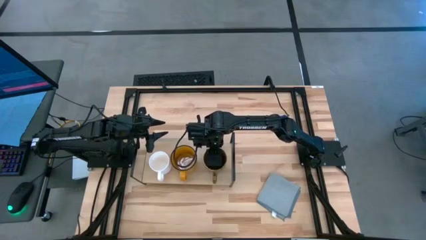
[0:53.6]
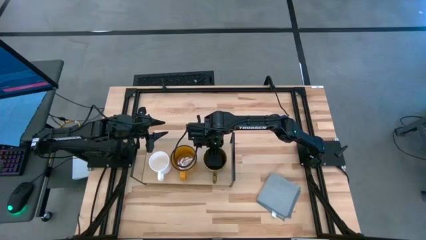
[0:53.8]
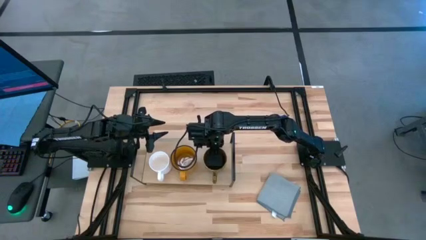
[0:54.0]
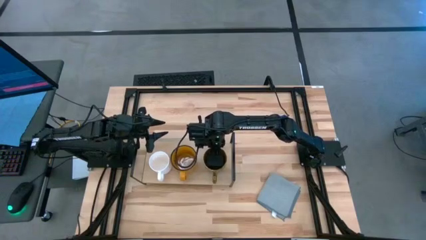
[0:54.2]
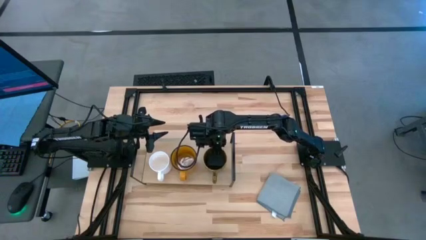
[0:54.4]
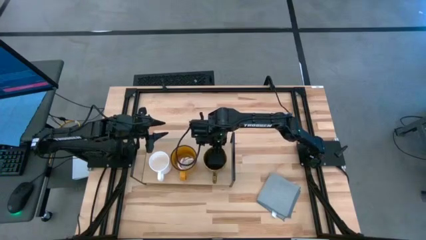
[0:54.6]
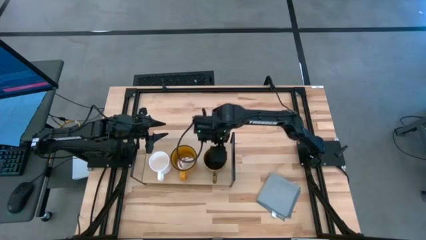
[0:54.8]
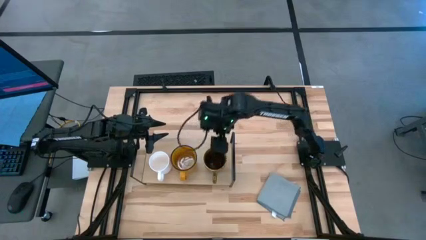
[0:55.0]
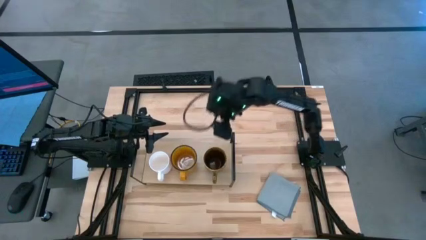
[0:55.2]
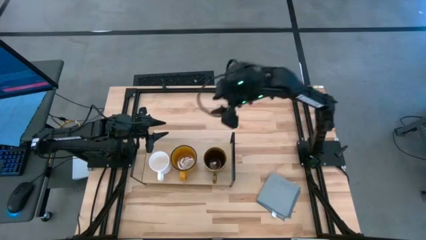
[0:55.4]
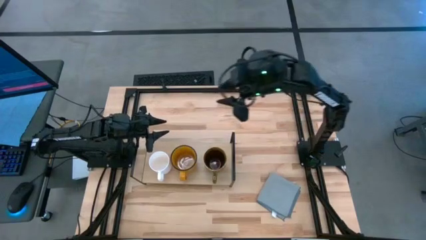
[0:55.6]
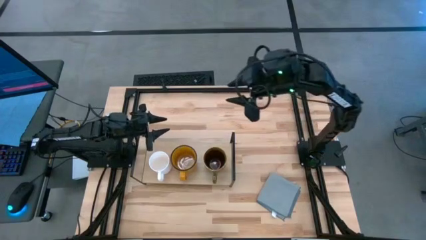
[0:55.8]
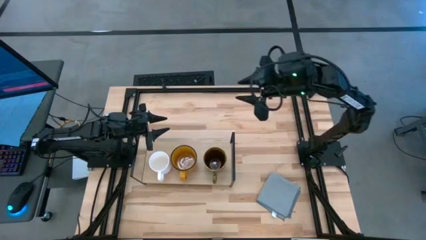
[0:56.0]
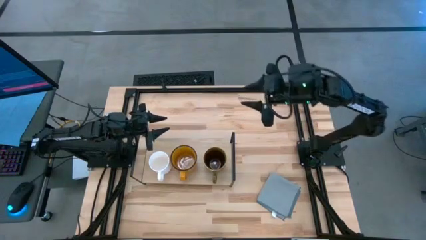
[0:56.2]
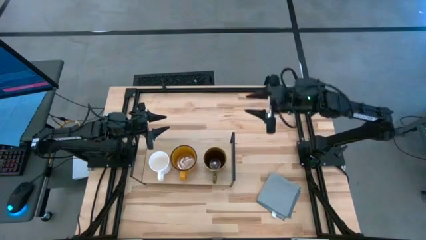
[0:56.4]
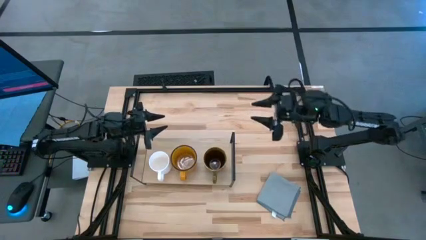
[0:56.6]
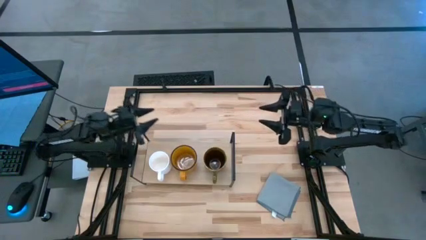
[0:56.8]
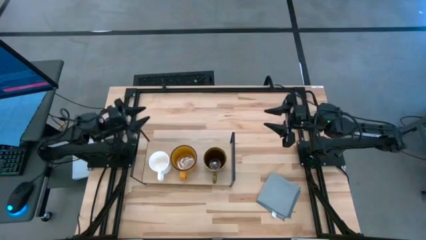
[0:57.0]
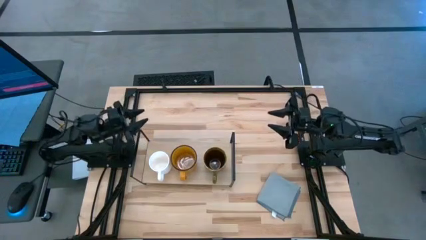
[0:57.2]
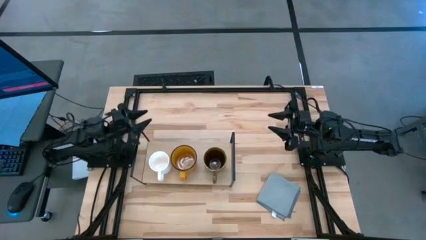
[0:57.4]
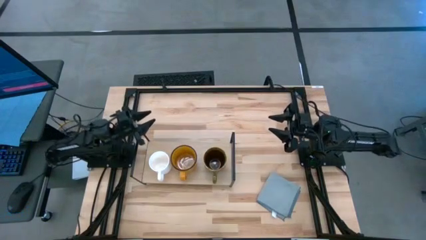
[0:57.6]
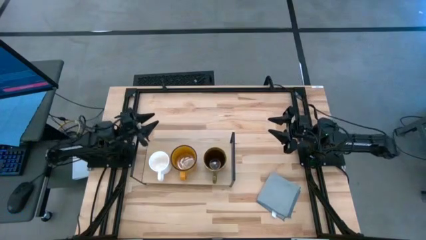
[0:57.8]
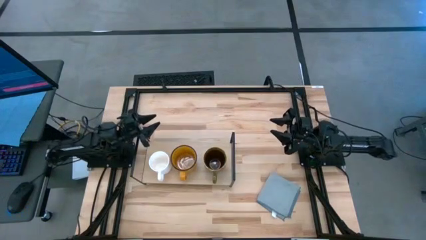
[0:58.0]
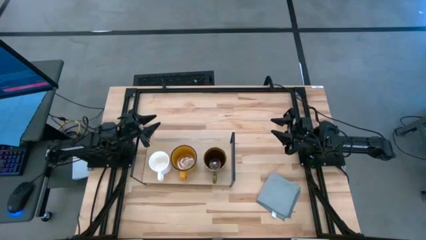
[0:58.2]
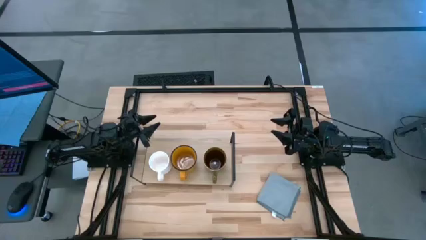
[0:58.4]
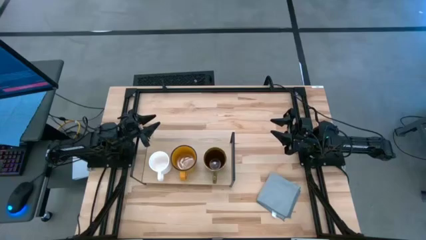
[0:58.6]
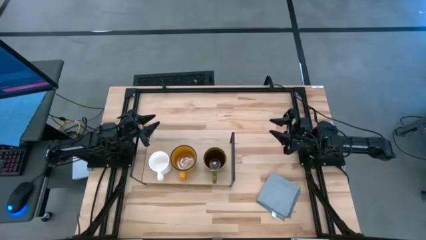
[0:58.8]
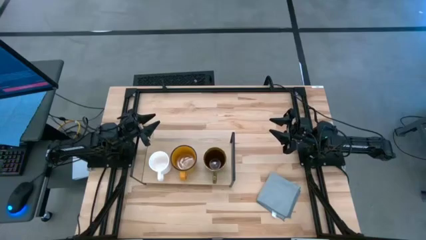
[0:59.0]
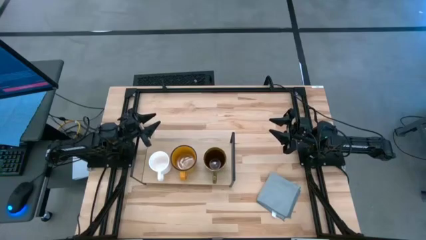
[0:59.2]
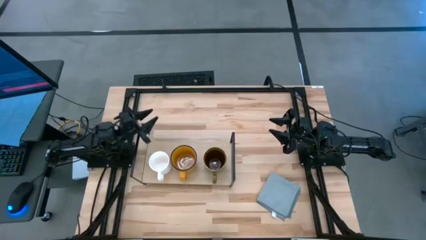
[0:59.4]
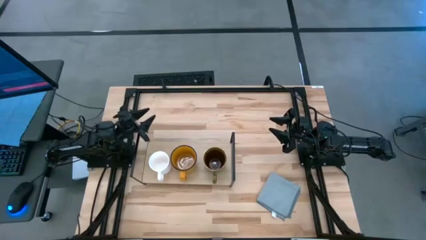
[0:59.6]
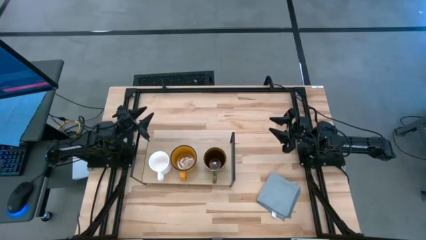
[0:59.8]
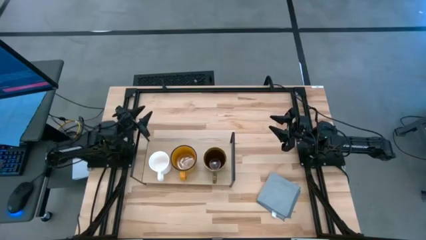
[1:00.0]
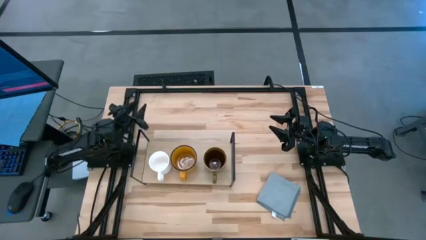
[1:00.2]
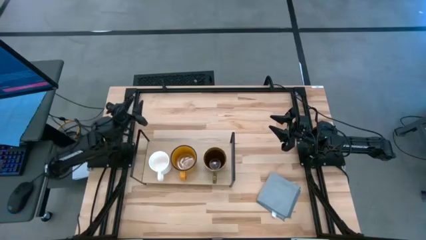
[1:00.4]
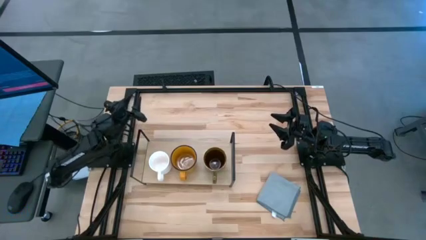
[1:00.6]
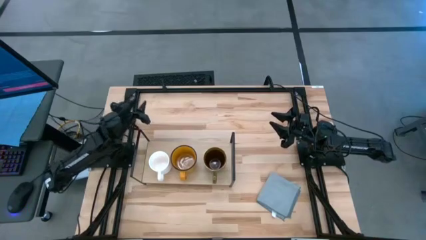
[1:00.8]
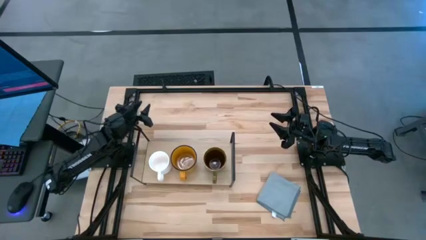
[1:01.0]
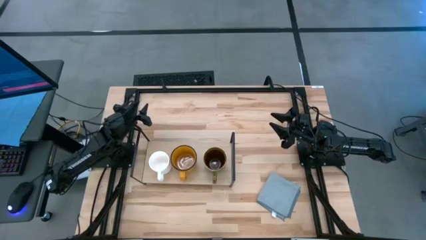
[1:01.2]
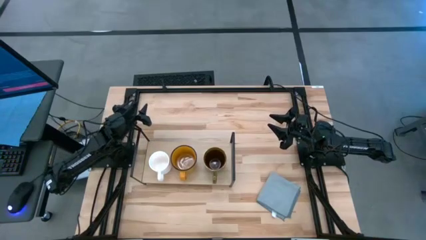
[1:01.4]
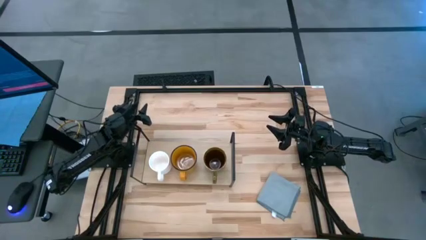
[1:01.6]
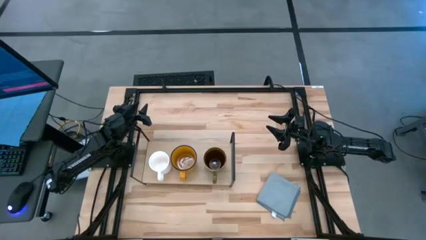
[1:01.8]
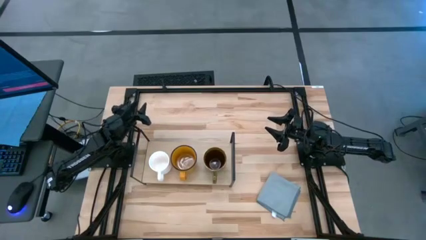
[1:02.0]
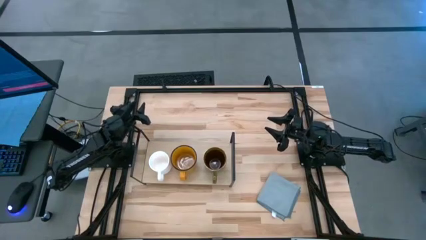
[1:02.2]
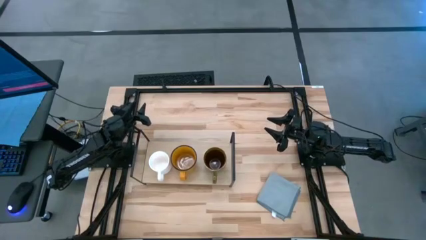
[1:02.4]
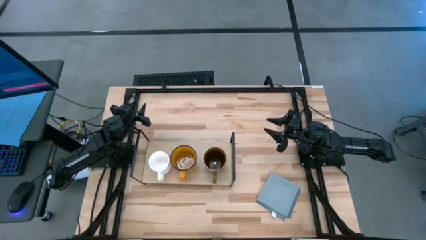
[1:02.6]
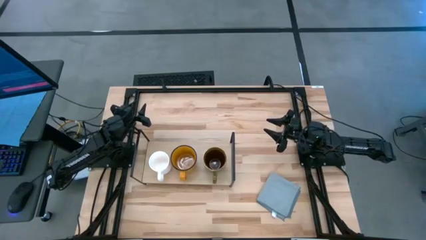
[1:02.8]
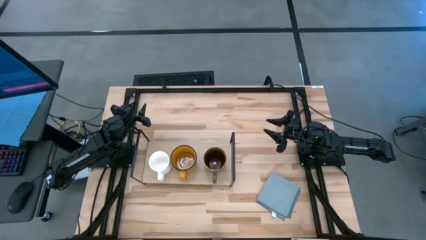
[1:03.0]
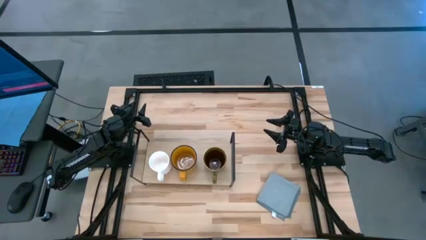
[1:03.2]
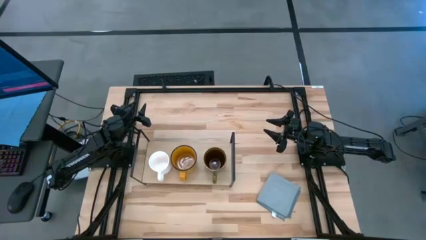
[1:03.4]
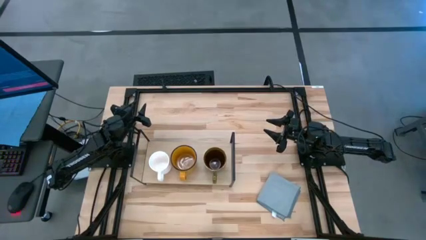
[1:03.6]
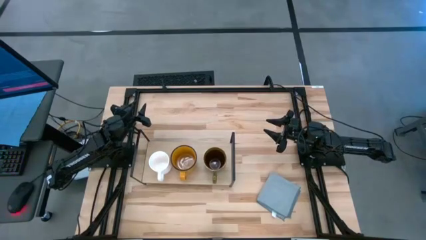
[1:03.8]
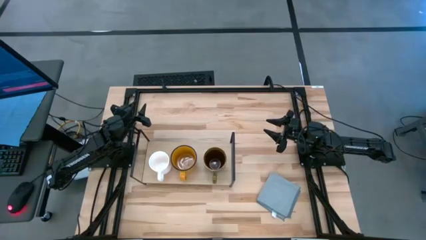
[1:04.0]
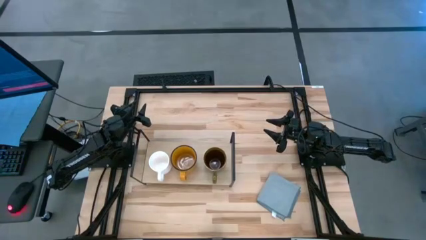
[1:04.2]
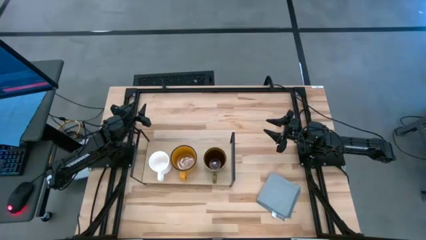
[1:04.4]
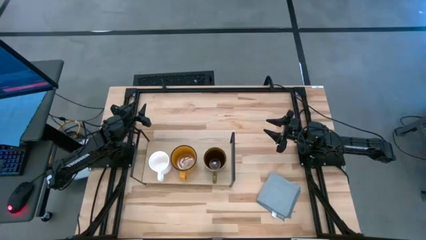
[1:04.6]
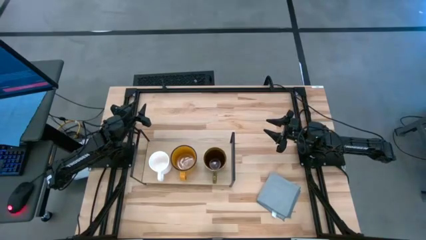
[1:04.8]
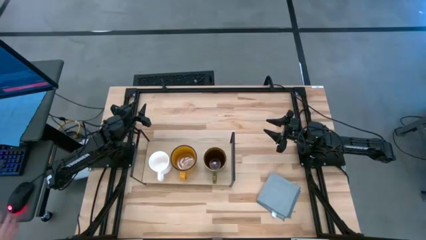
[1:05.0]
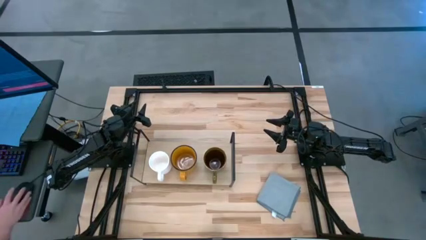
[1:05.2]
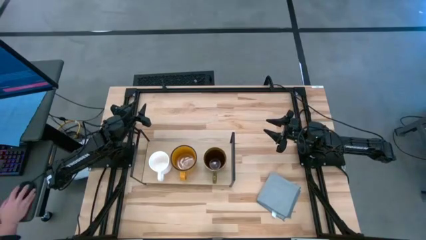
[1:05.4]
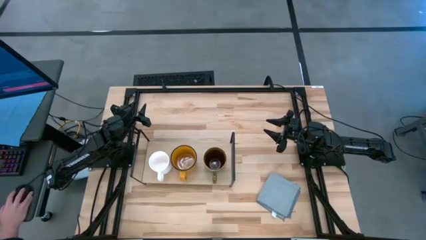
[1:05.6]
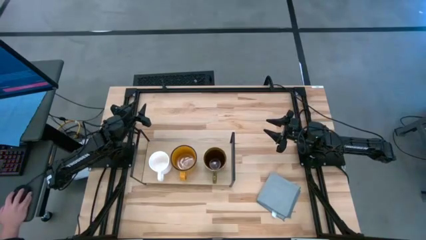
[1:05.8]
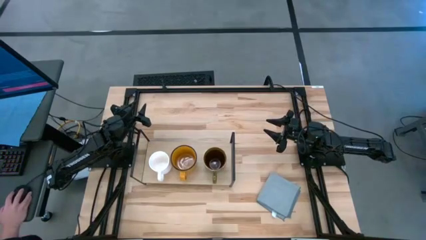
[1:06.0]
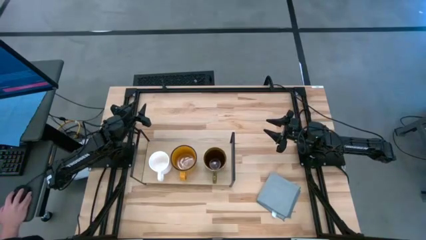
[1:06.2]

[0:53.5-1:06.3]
Task: Stack small to large cups/mugs on shelf
Return to Home Position

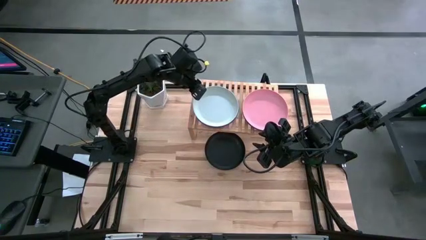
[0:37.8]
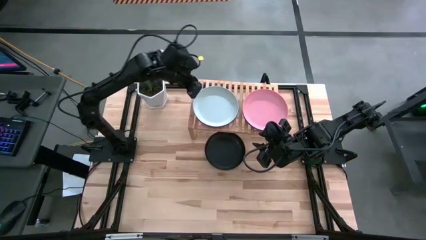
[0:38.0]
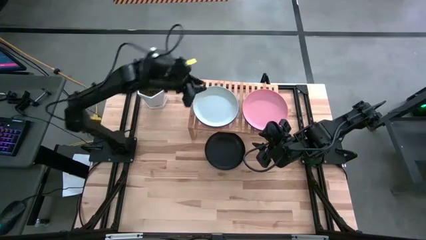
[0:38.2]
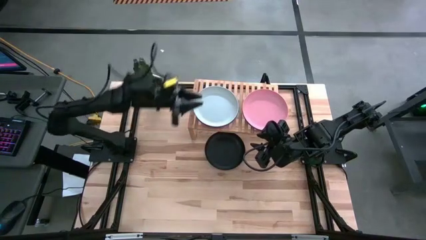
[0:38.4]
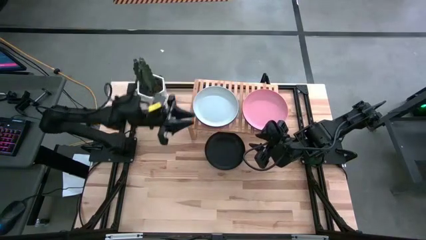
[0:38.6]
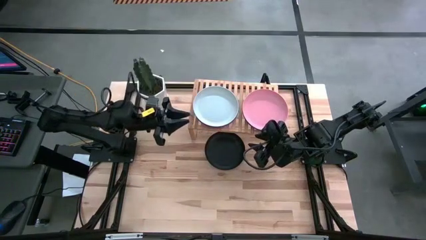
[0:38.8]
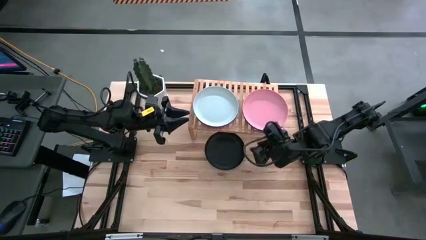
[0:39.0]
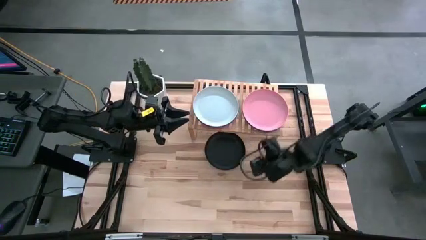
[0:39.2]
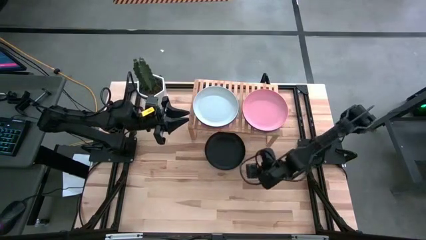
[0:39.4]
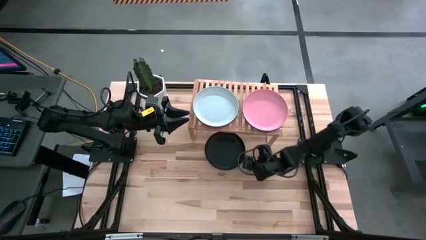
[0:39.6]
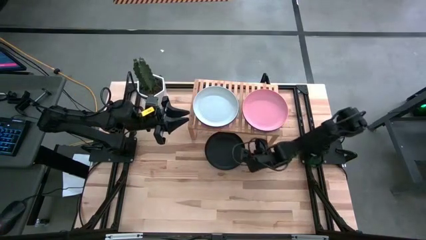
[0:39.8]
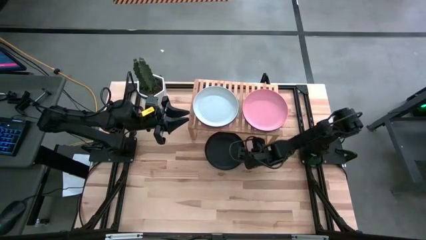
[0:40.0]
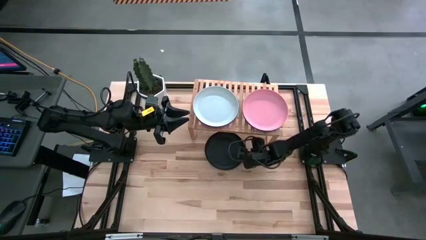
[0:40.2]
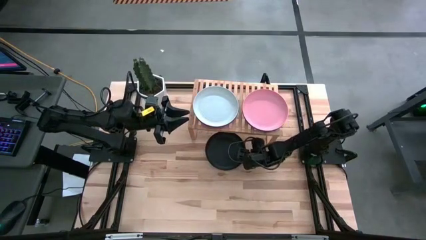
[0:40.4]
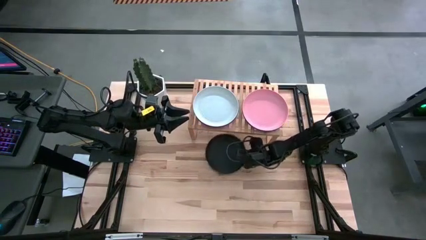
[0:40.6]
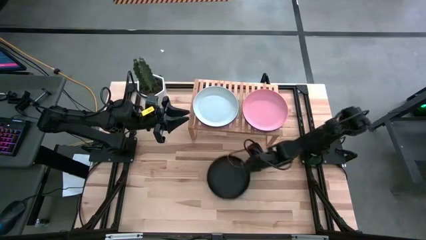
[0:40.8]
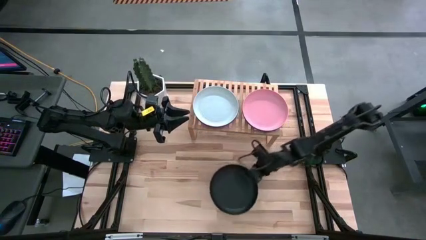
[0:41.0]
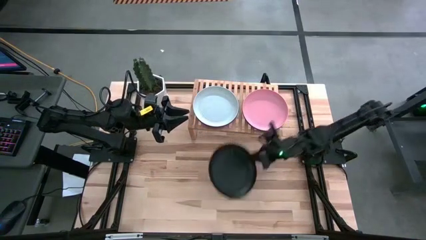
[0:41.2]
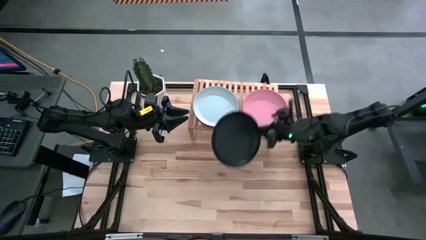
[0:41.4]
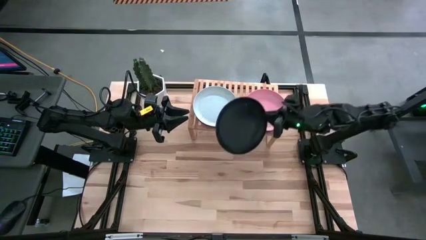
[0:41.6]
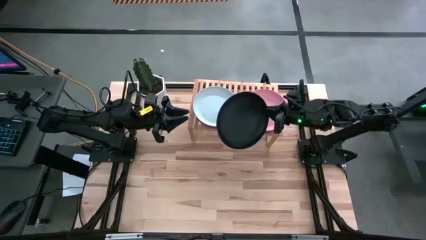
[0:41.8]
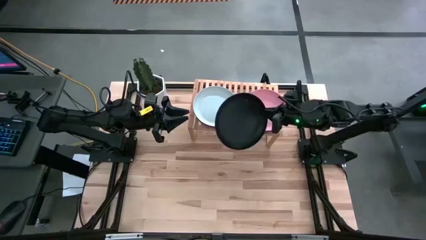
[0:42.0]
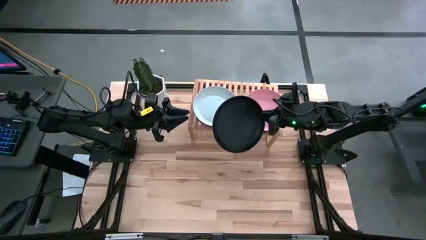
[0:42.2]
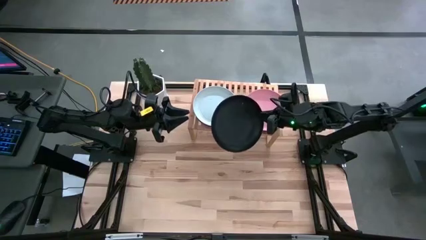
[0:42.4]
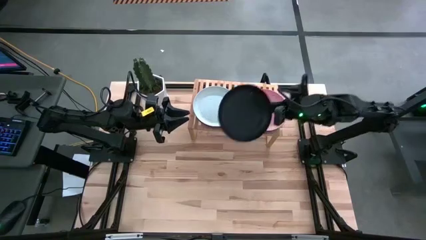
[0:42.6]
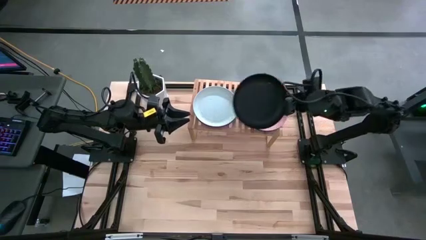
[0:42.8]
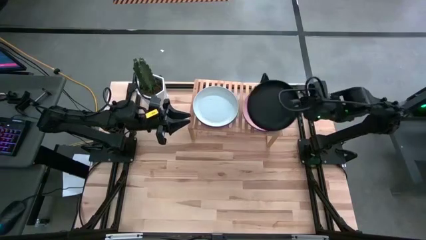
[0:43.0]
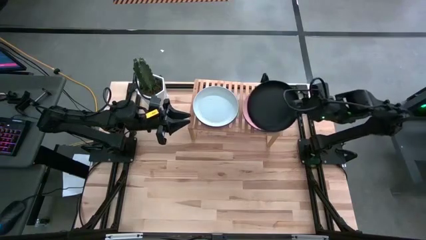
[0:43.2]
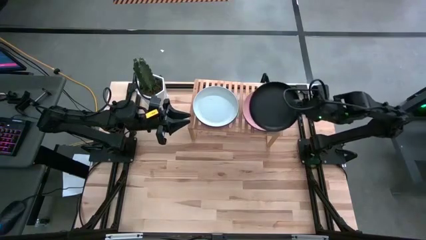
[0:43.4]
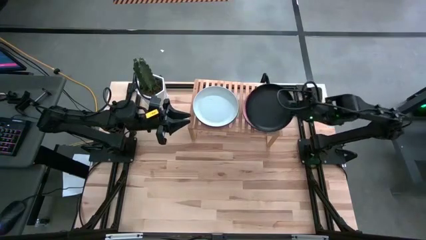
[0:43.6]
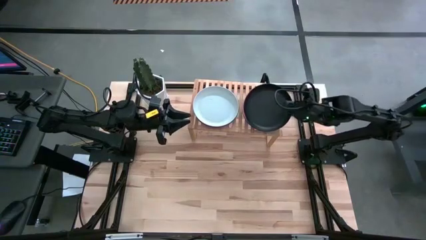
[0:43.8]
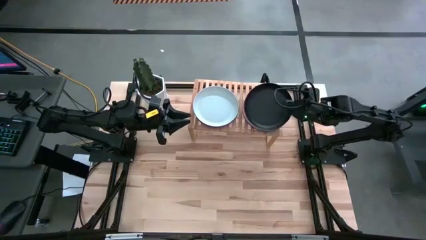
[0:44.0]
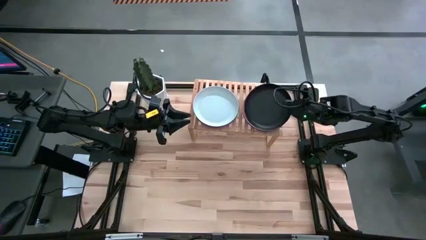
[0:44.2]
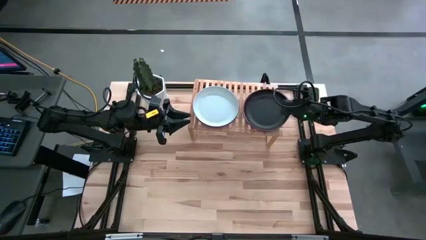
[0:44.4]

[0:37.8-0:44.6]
Task: Place and stack plates onto a shelf
Stack the black plate on top of the light pink plate on the shelf
